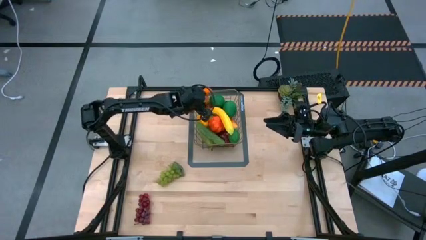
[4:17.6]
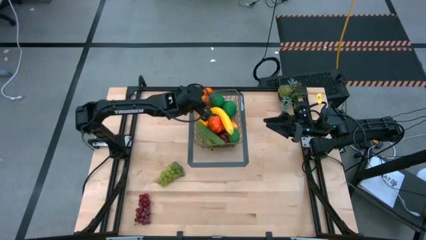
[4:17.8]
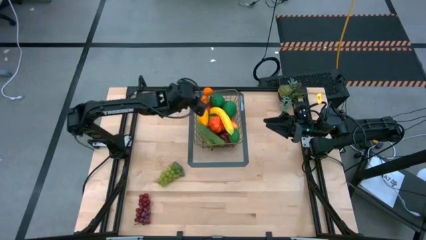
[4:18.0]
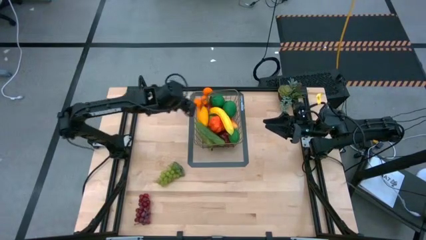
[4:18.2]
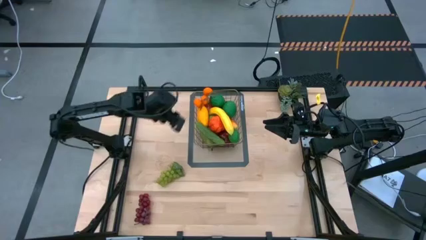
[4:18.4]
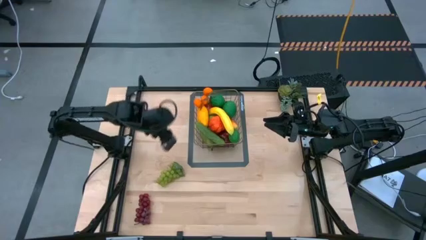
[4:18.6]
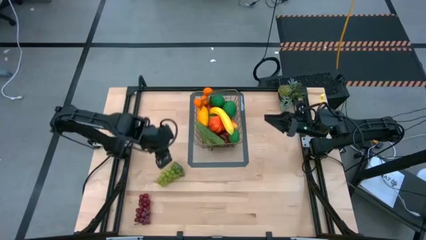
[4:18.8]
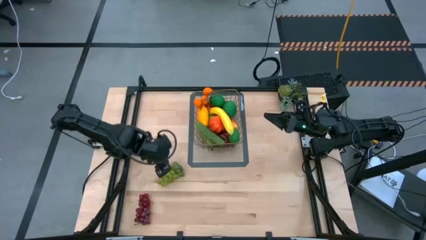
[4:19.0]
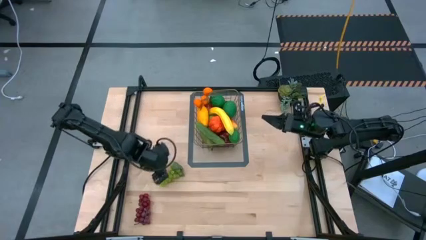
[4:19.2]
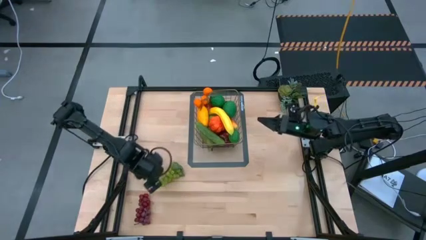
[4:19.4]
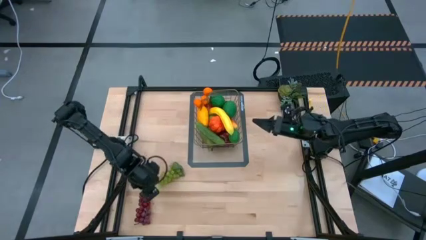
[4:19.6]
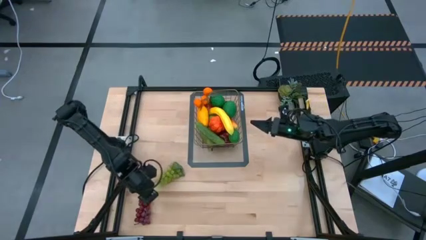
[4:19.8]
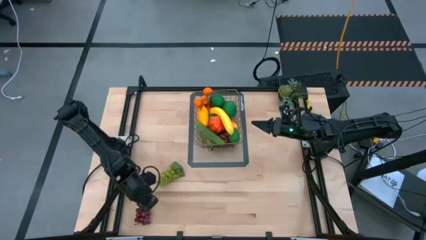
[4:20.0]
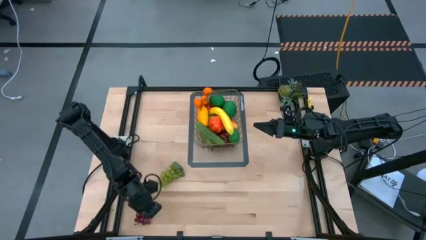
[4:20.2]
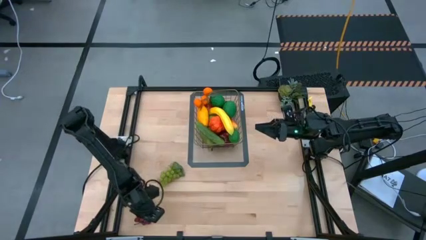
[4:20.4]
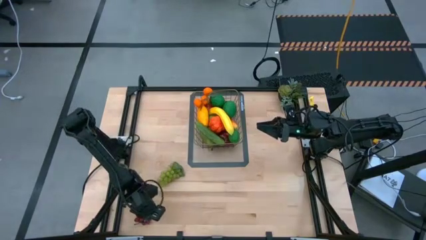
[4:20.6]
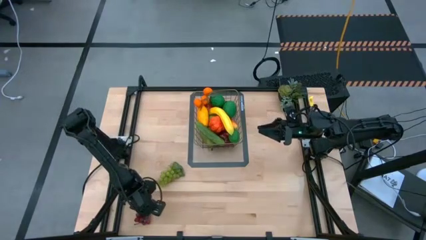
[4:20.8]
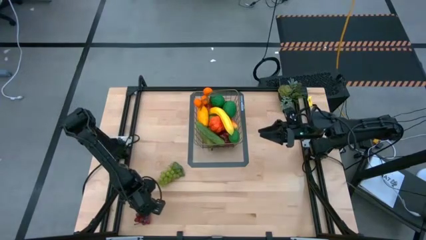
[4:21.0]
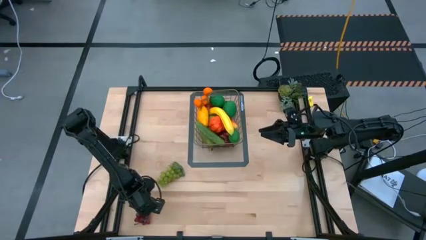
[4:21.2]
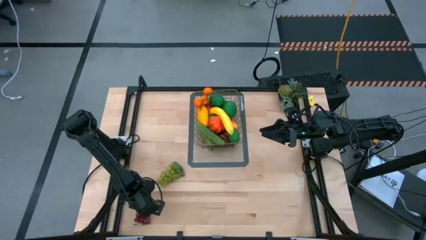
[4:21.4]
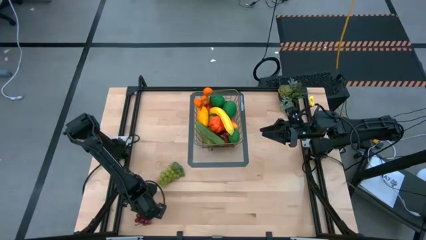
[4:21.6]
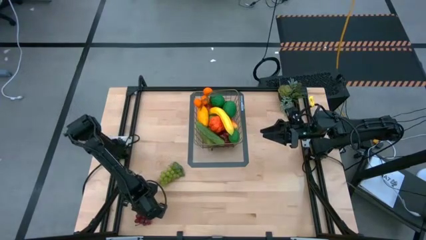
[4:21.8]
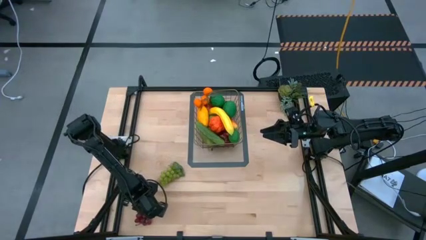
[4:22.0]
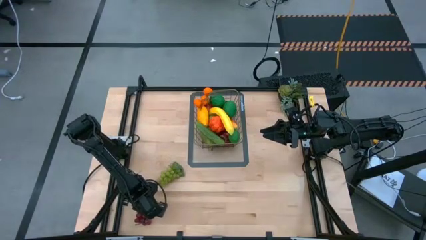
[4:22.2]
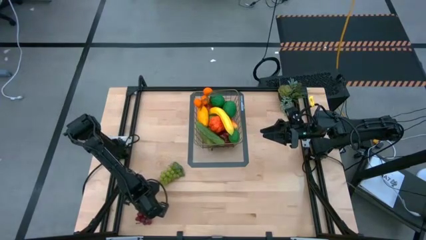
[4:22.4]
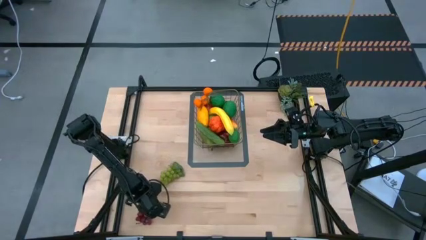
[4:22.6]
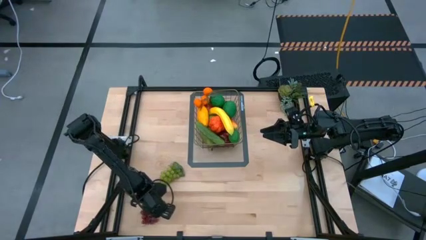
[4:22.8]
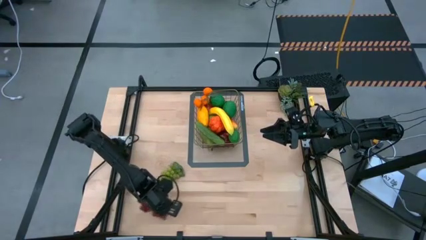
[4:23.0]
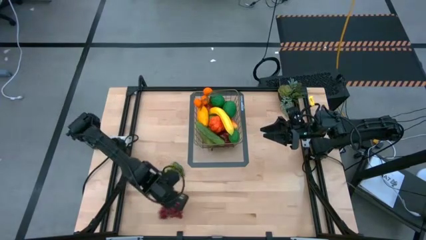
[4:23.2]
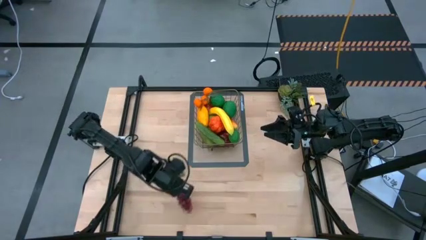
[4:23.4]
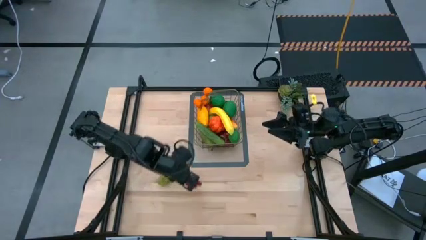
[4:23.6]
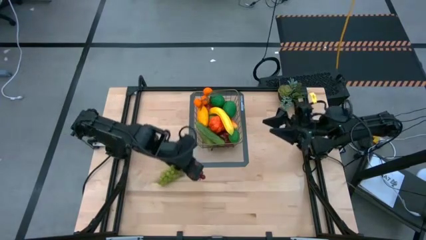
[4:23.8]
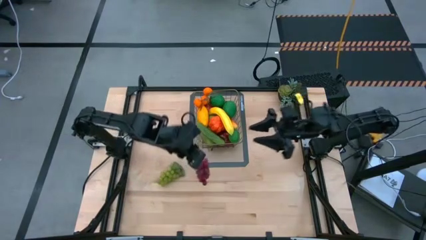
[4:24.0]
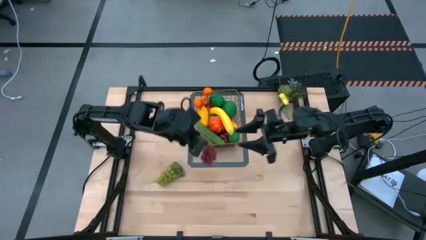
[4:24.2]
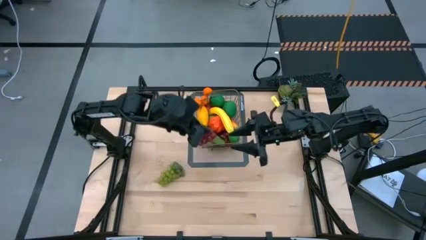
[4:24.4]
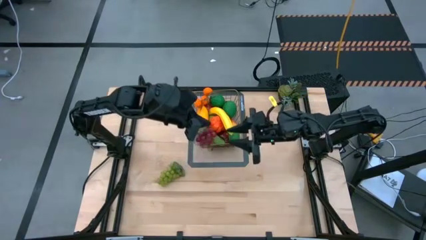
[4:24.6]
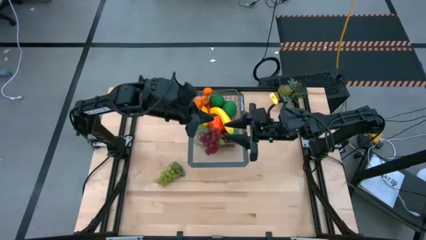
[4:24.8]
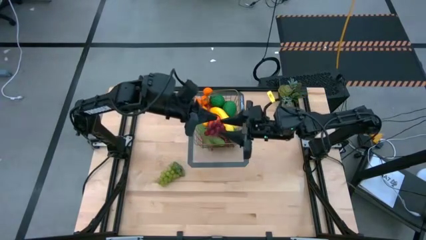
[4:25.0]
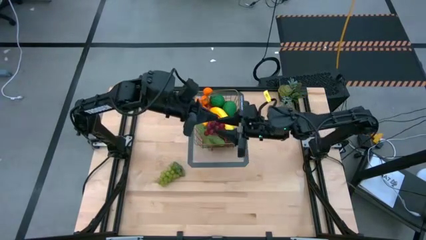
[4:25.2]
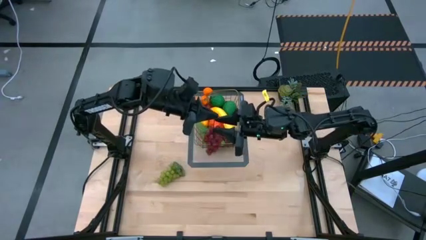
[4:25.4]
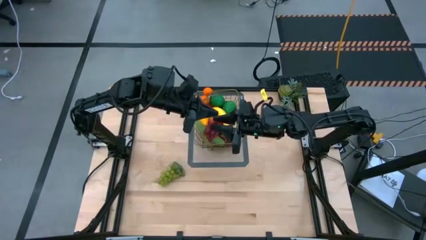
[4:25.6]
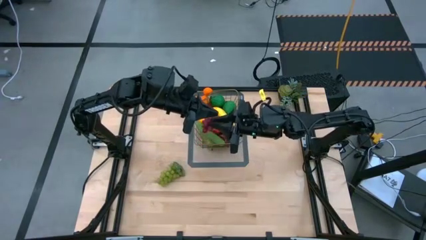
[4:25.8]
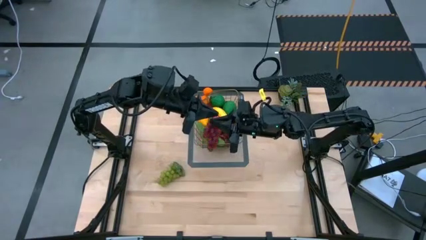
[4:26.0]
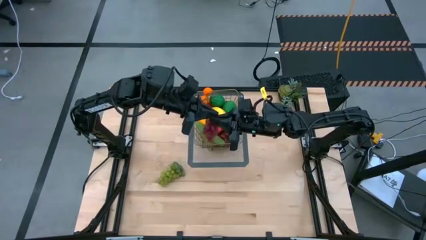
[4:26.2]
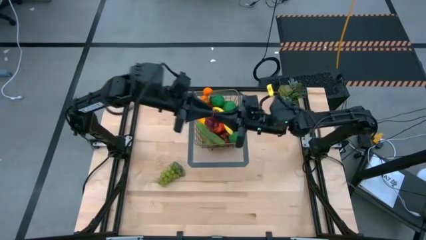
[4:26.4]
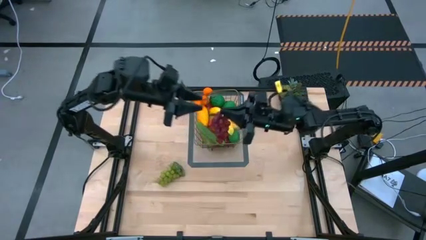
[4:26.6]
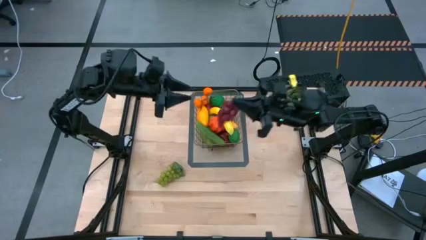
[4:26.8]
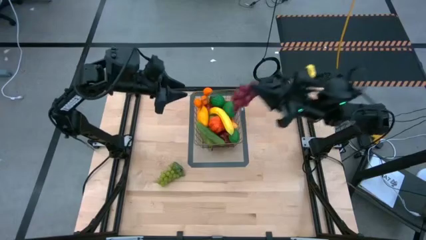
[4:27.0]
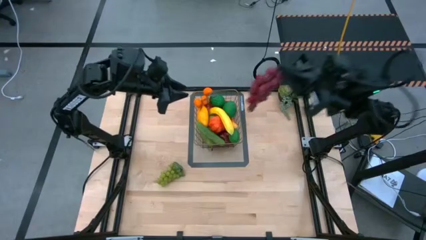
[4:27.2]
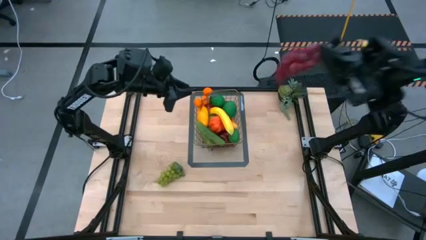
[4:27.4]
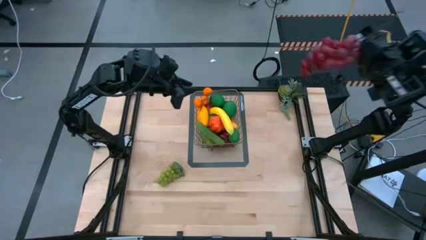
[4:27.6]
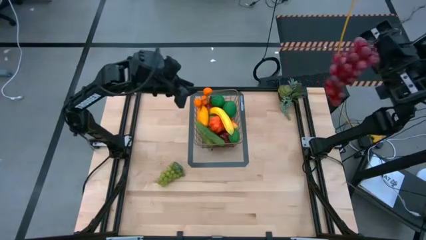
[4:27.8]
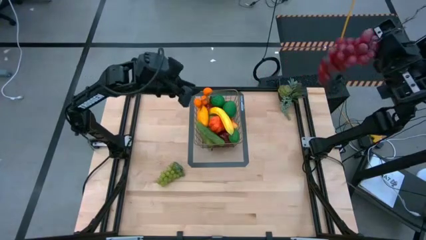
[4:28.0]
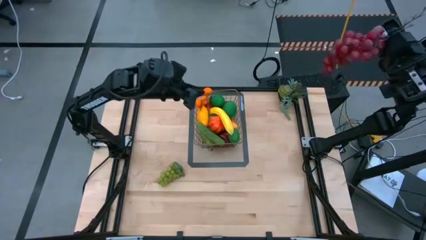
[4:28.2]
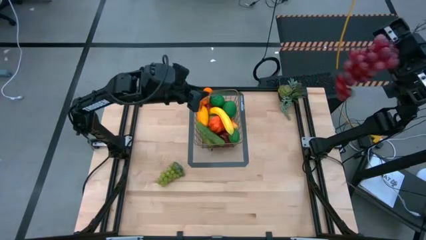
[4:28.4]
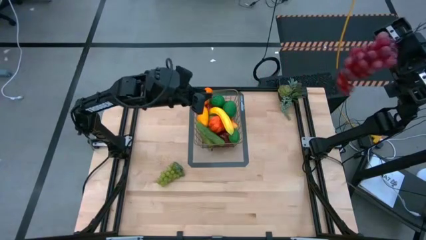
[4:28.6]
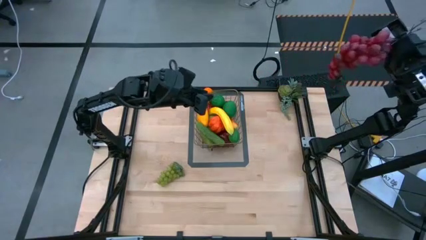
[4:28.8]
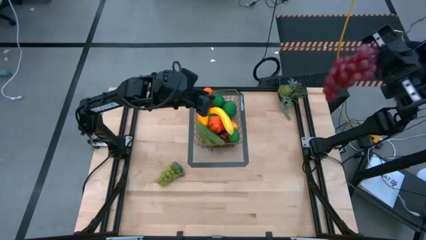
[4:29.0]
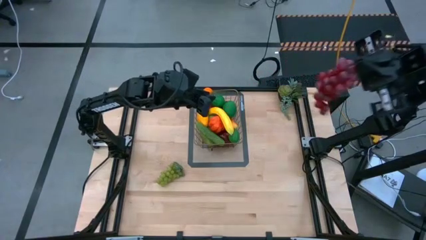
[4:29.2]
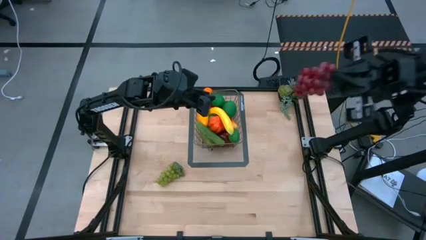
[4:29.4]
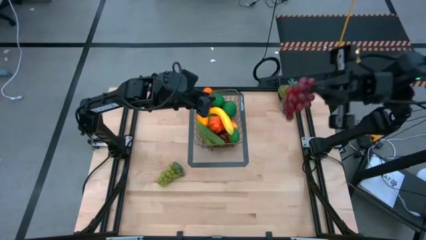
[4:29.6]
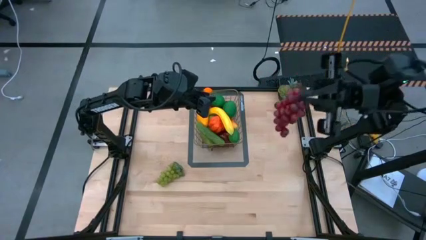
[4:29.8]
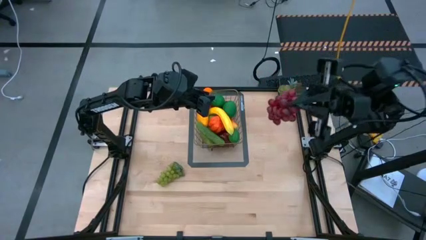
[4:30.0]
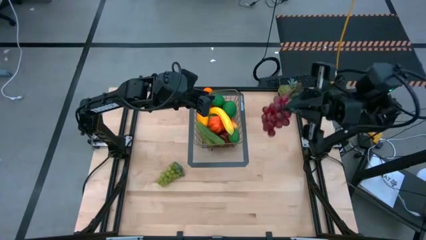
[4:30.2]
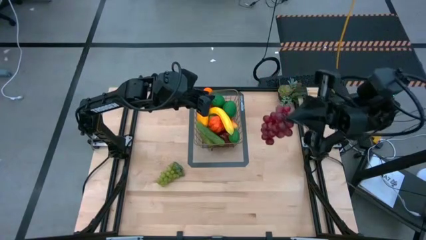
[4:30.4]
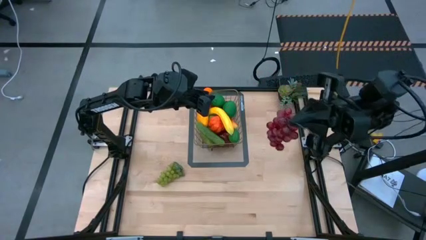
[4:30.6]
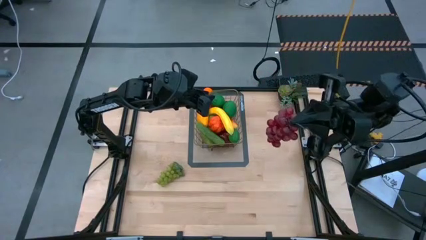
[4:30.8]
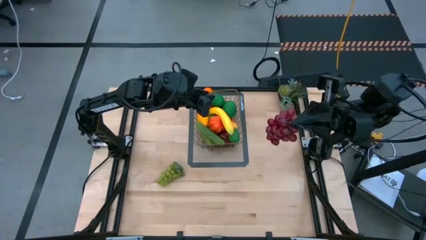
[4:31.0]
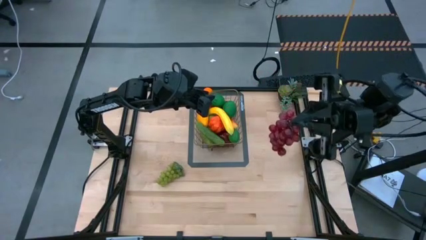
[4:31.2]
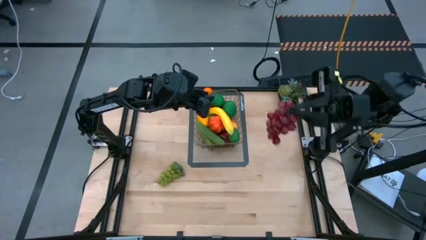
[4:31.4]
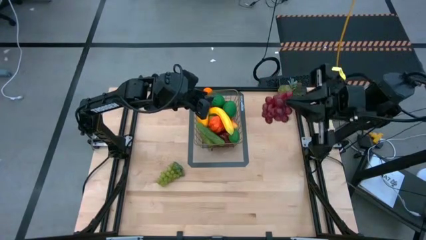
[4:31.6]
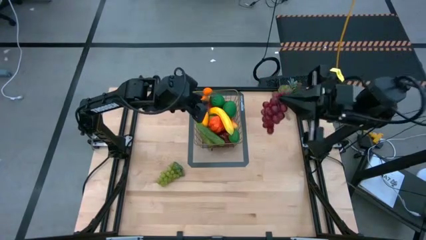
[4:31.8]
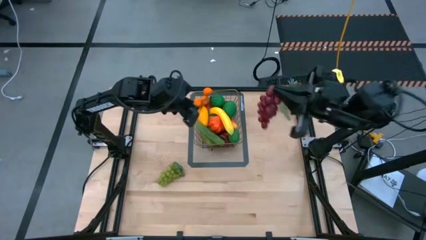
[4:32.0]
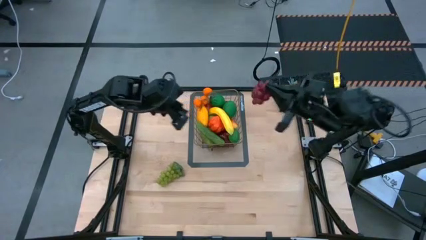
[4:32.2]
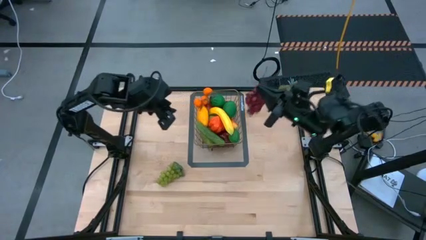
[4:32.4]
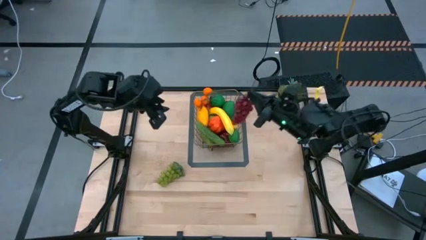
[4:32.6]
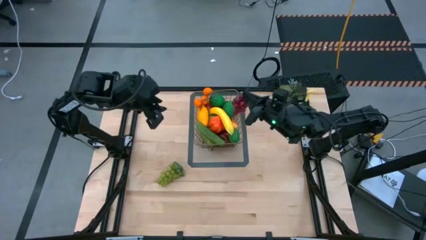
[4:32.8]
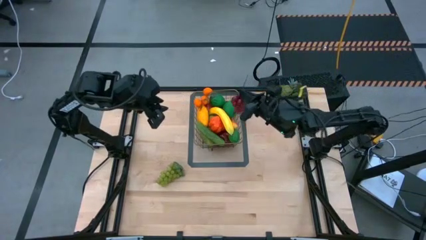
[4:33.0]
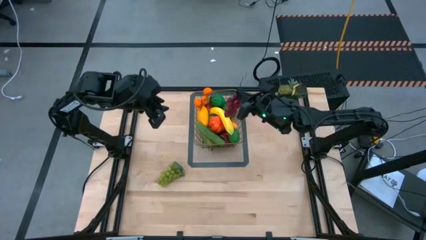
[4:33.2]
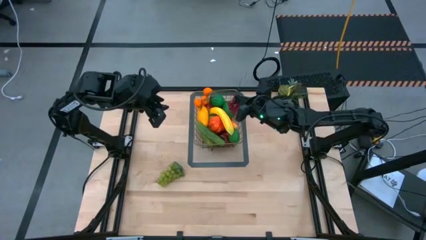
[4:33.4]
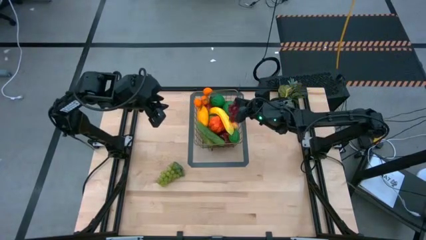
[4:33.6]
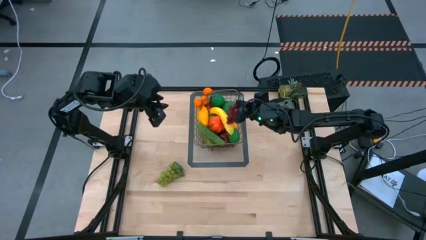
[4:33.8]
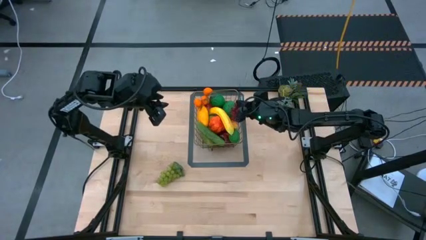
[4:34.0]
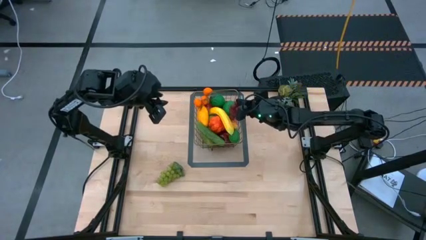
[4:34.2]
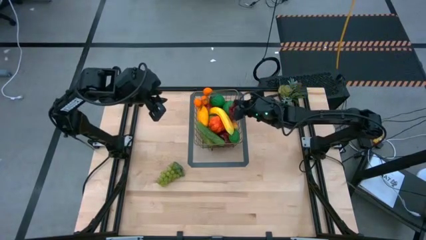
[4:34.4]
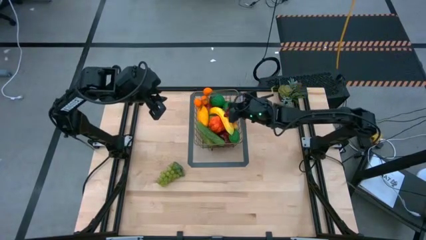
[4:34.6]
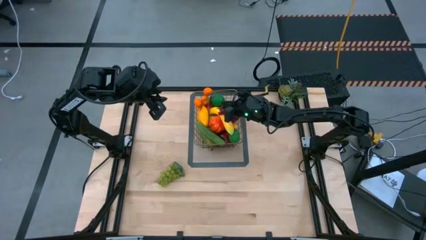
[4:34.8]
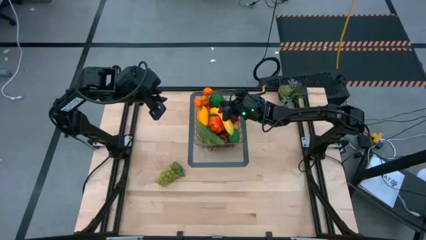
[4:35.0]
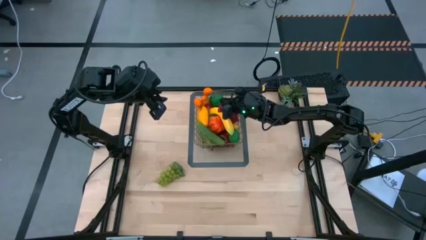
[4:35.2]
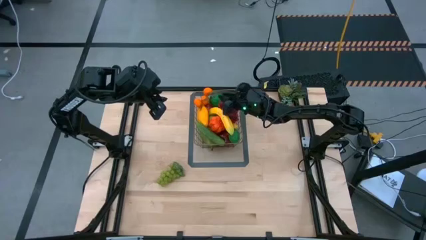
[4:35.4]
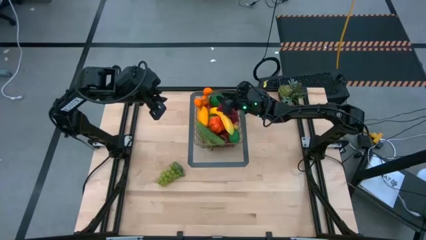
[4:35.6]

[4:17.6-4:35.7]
Task: Build produce basket
Put the purple grapes into the gold wire basket
